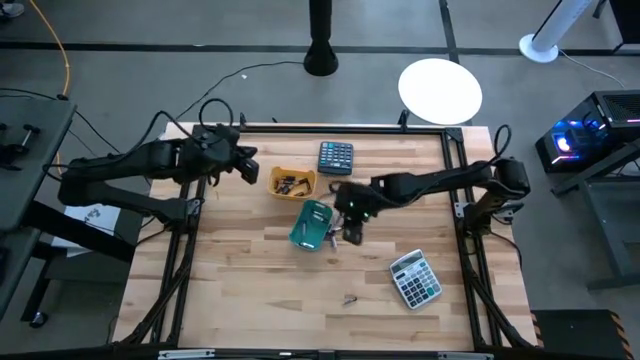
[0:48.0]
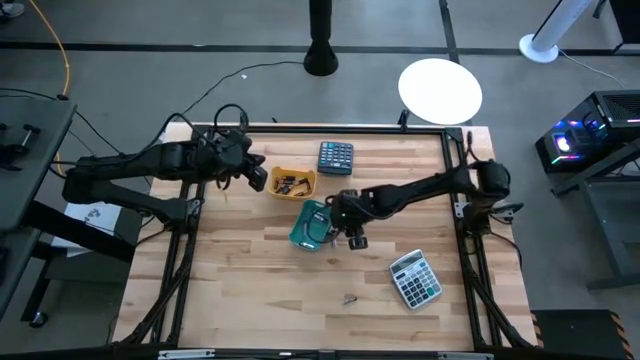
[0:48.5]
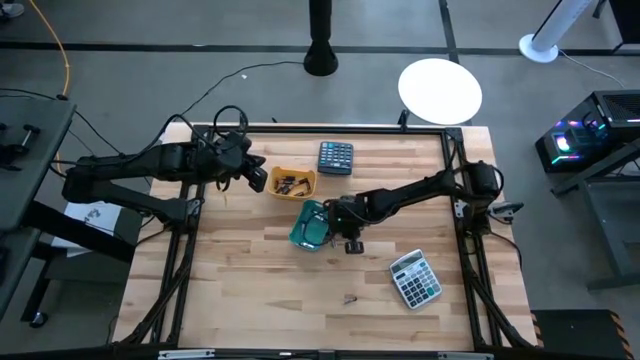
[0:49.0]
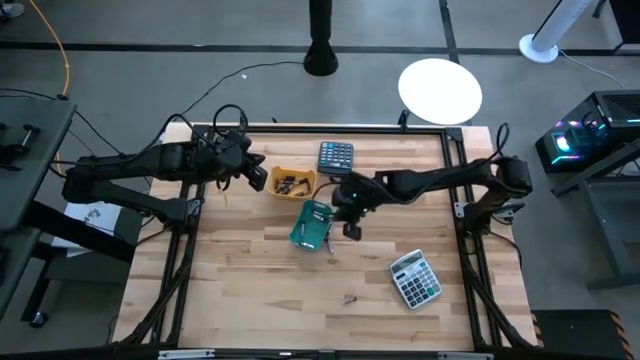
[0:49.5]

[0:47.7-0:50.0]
Task: Sort batteries
Put the silver battery into the green bin

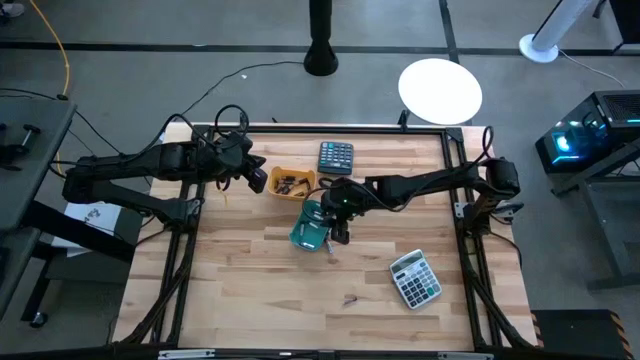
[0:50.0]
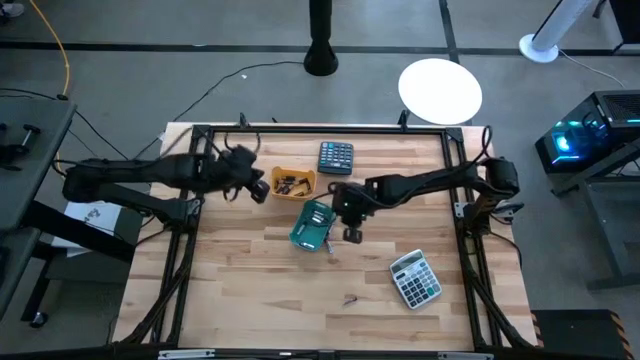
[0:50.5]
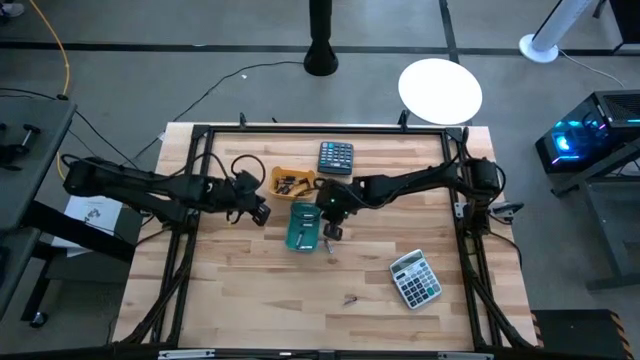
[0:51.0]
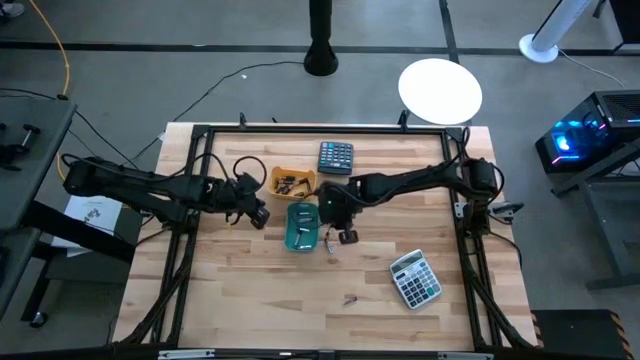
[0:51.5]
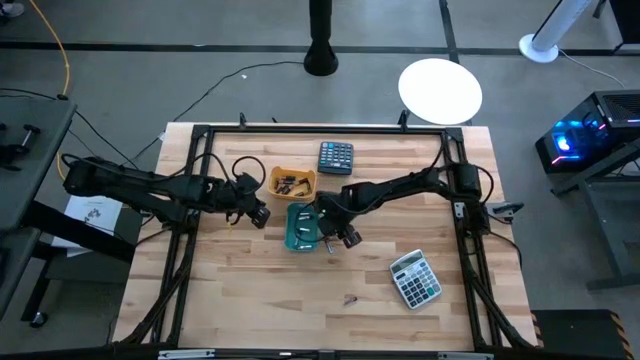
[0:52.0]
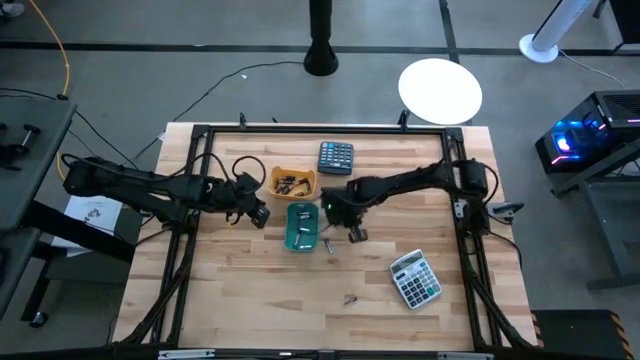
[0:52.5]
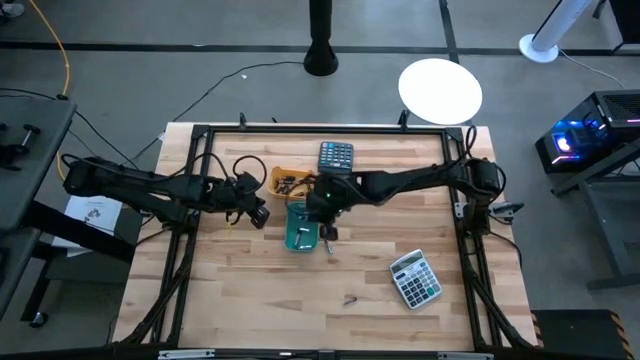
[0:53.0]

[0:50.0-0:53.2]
Put the silver battery into the green bin

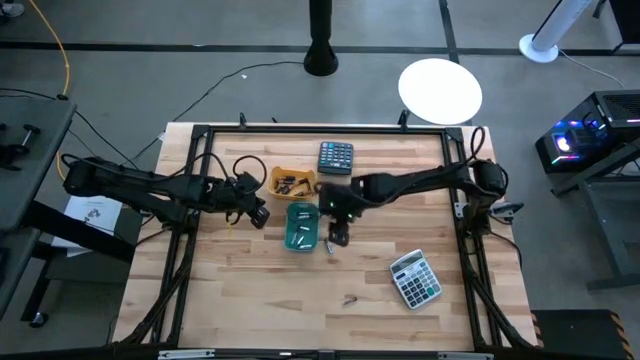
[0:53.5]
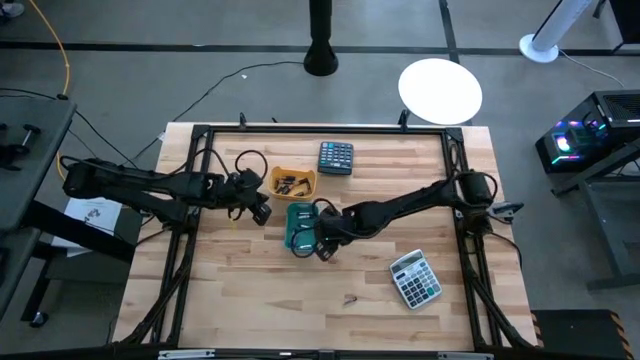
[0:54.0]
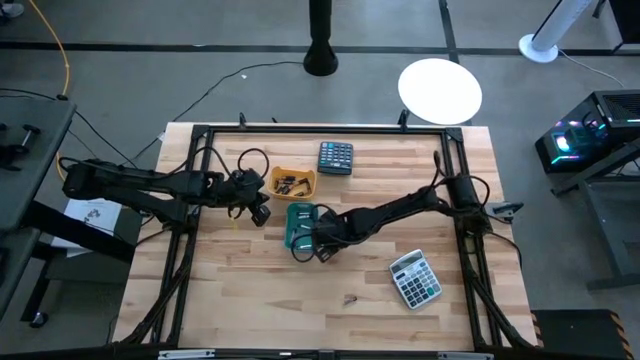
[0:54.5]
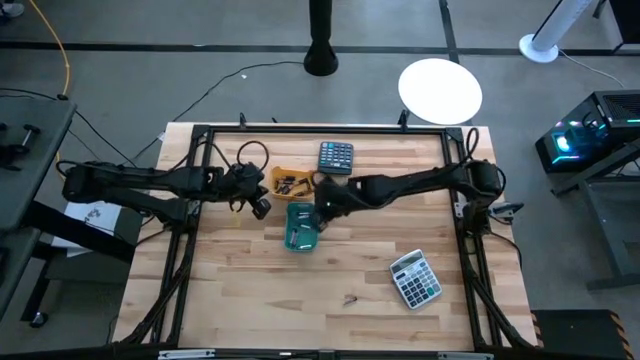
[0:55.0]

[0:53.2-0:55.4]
Put the silver battery into the green bin

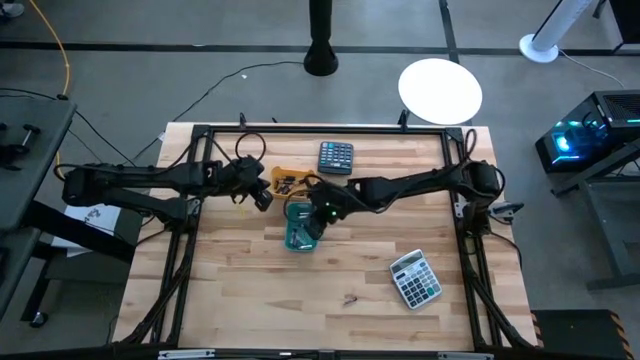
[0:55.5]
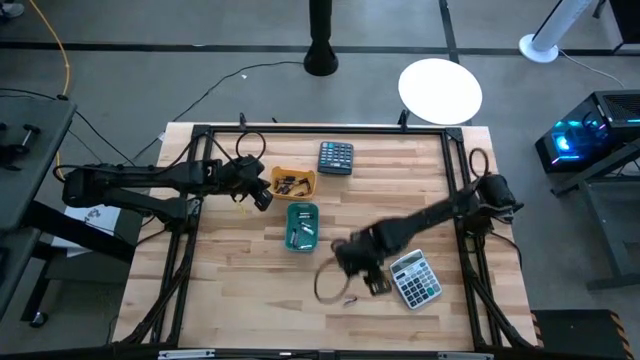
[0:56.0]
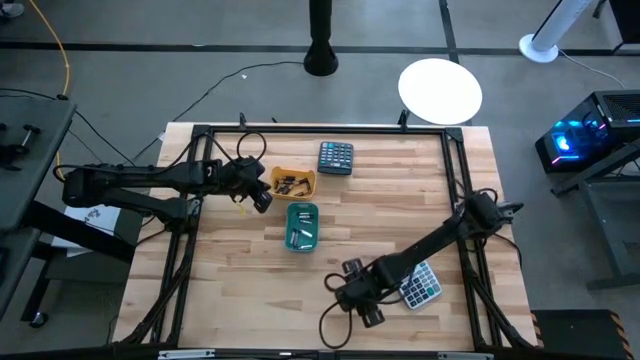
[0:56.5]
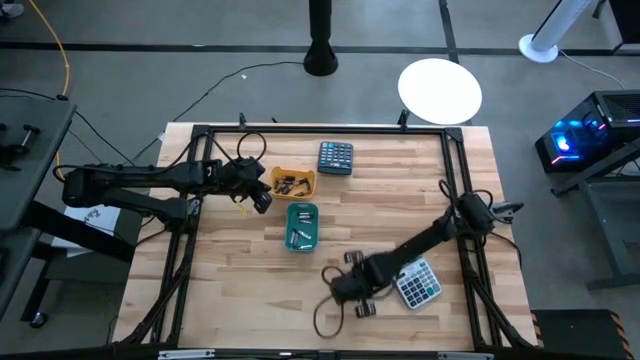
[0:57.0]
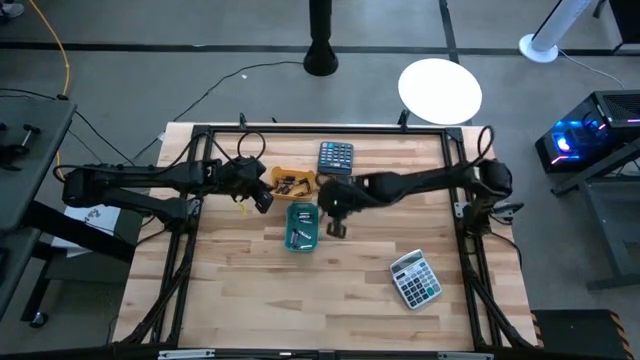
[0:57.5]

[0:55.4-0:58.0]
Put the silver battery into the green bin

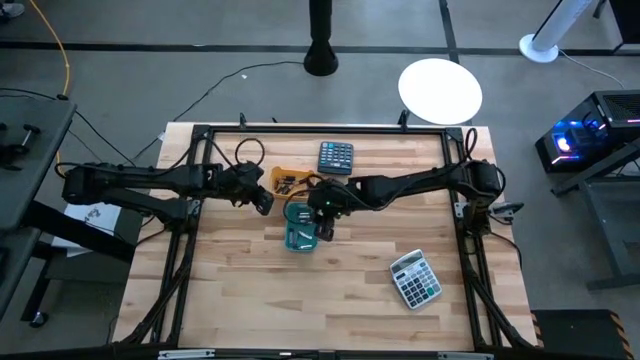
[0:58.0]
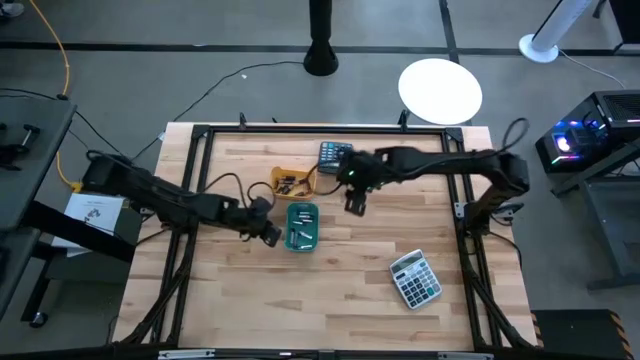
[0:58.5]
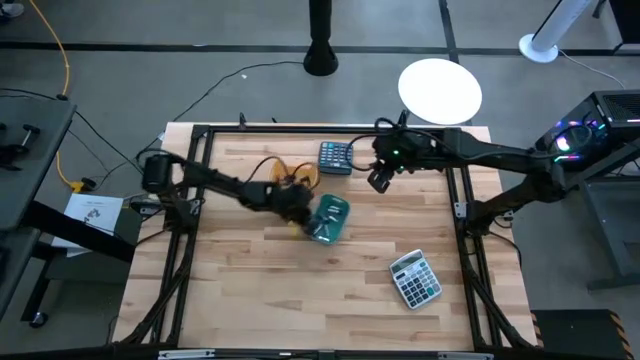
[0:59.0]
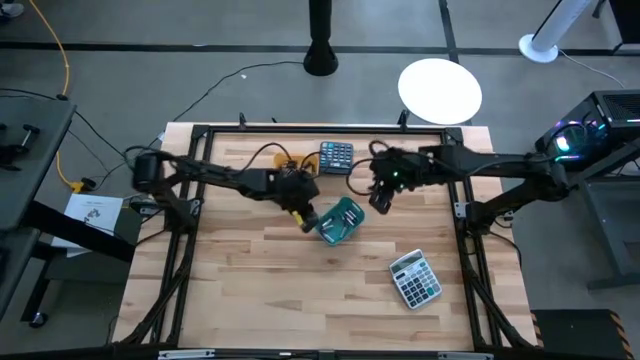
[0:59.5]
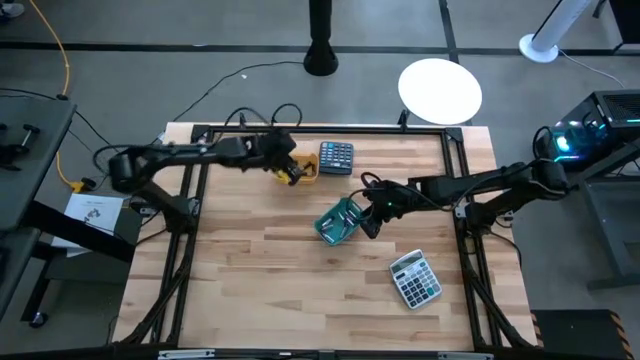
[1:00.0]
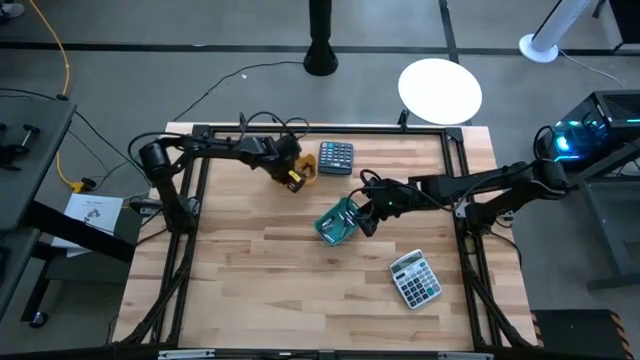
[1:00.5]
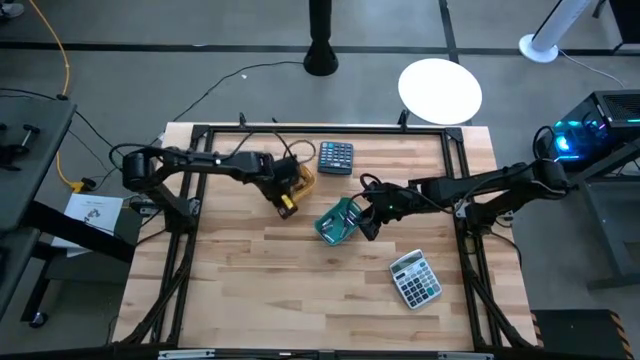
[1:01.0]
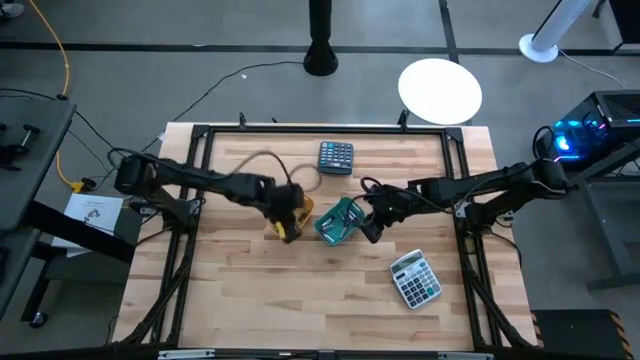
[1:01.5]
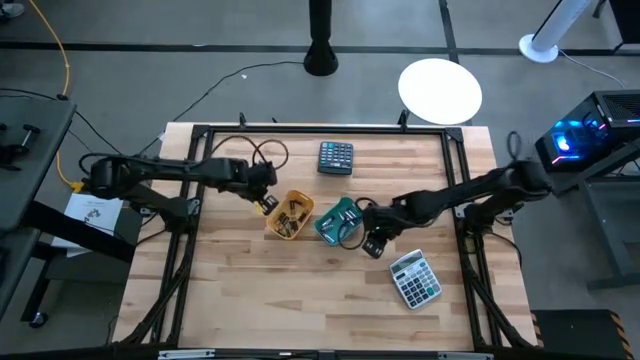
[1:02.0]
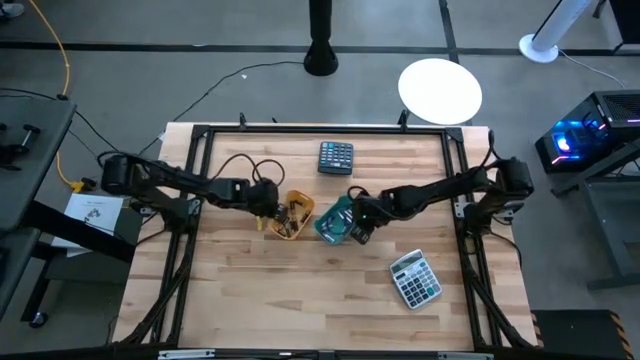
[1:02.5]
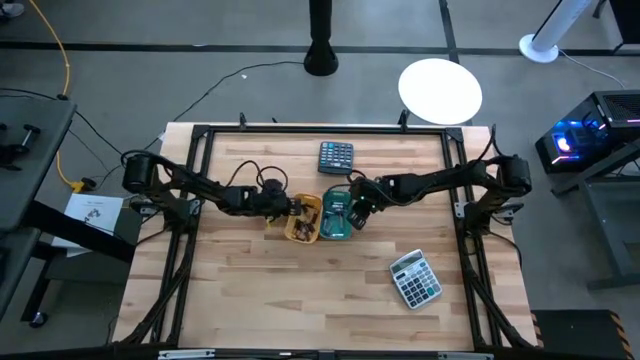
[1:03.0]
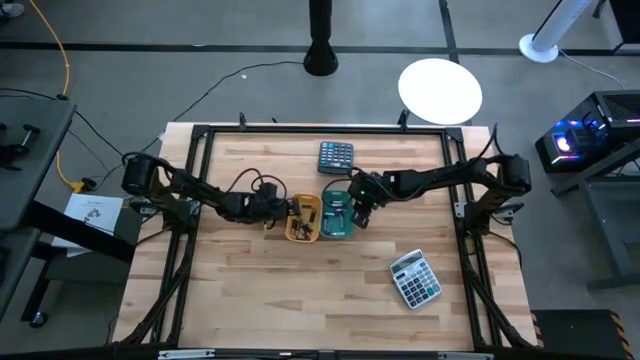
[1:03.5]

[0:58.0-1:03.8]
Adjust the bins

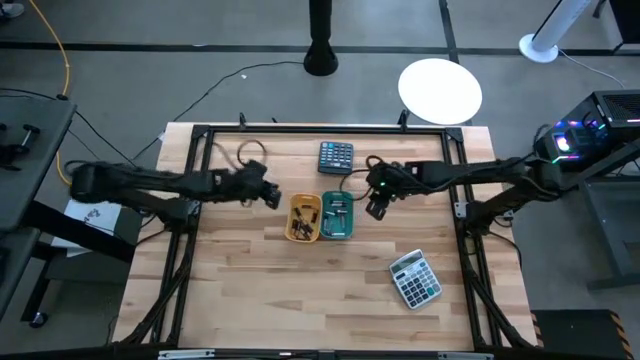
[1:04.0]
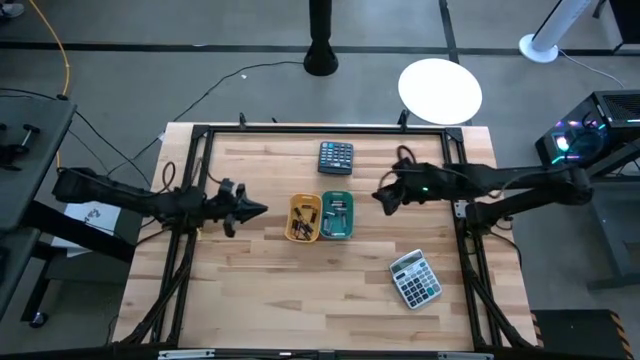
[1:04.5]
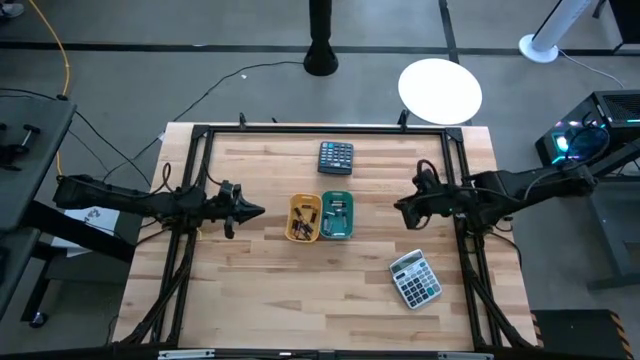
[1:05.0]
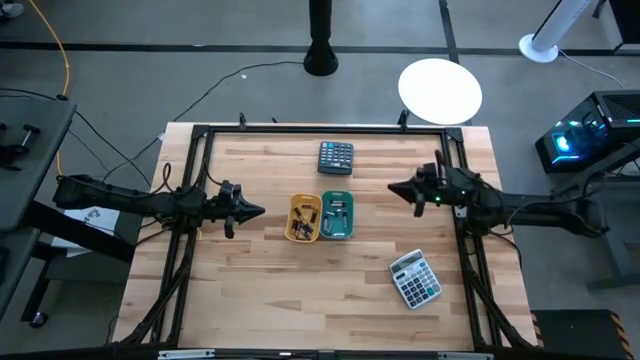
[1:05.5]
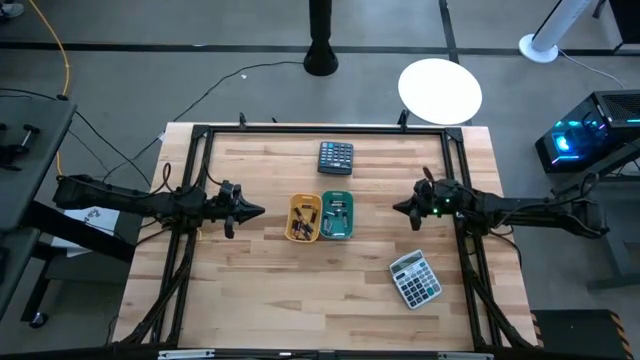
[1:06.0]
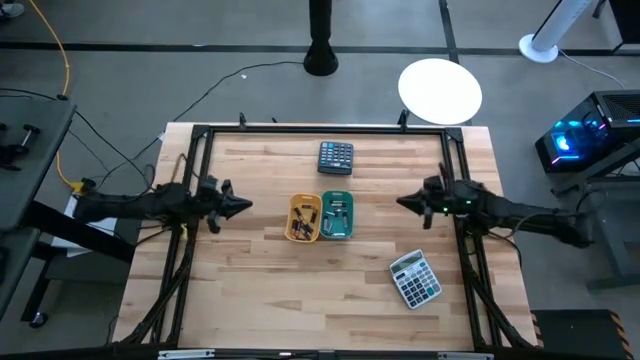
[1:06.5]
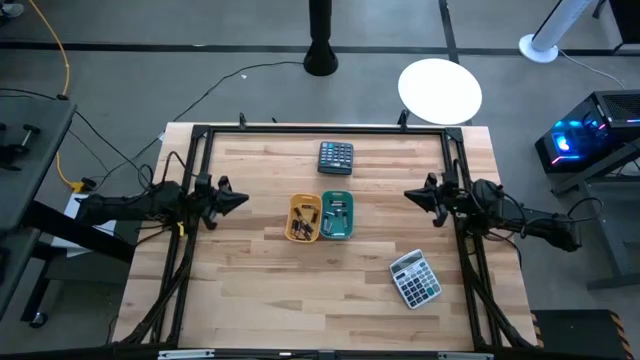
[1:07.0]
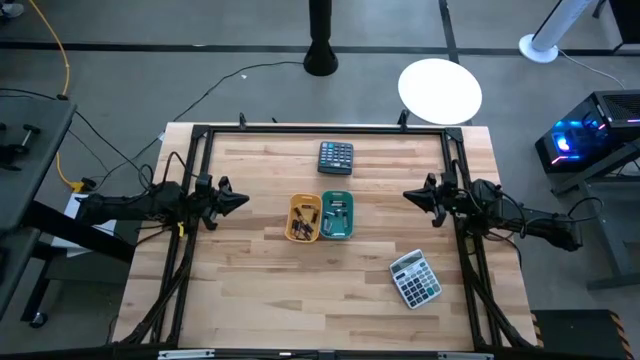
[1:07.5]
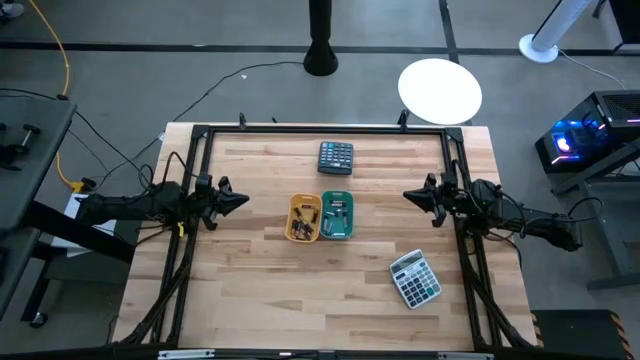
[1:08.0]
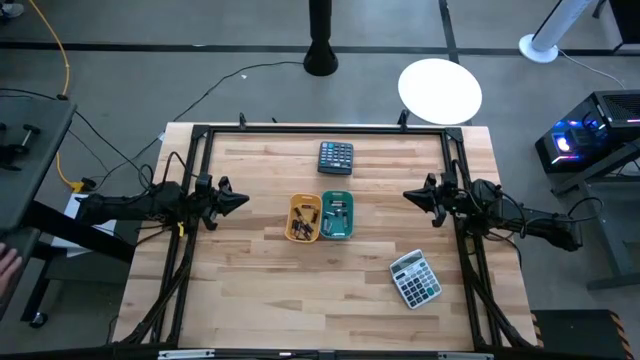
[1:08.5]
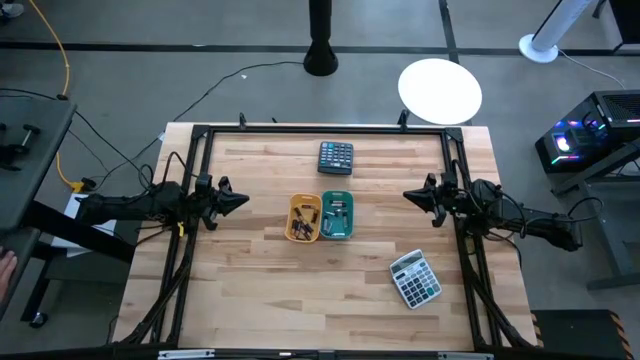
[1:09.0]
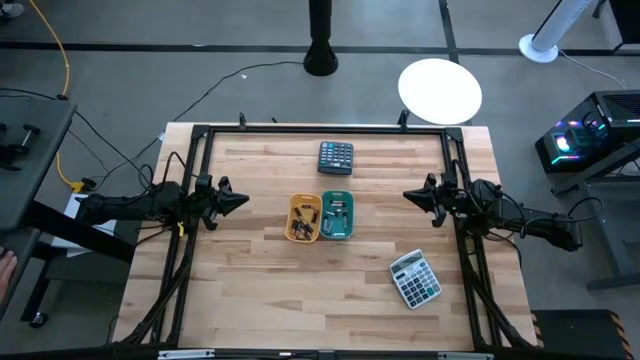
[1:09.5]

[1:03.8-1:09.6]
Return to Home Position
